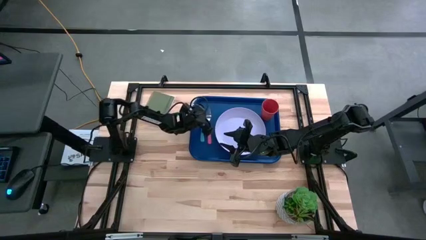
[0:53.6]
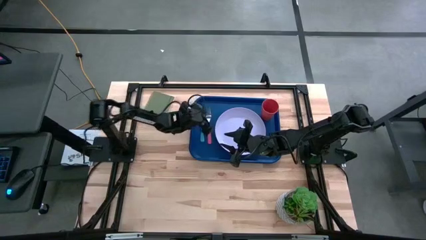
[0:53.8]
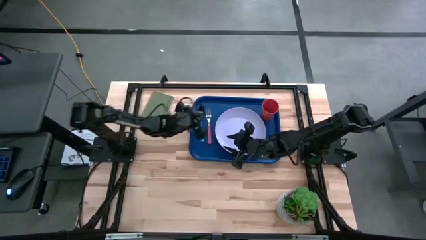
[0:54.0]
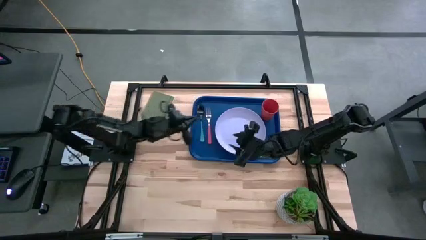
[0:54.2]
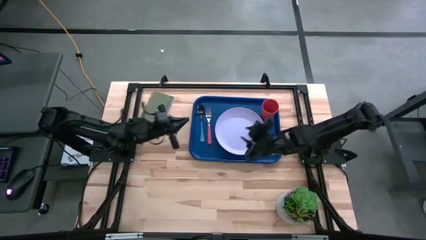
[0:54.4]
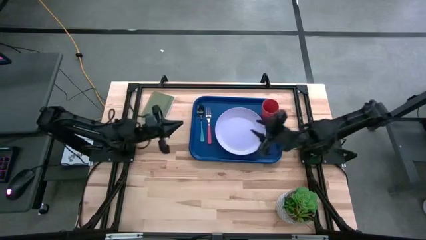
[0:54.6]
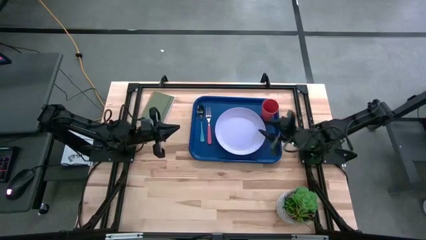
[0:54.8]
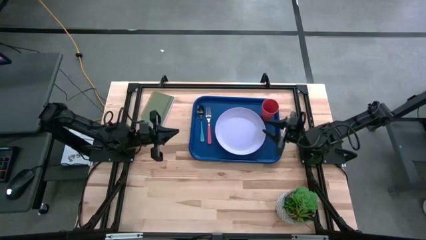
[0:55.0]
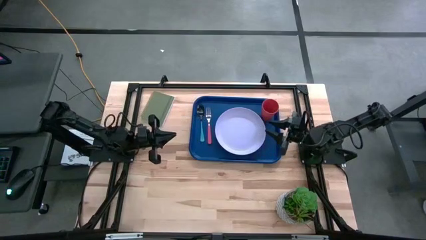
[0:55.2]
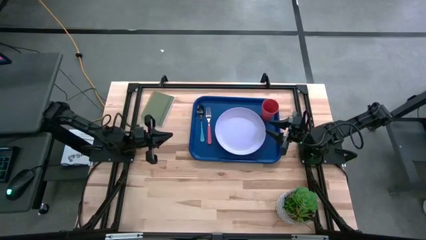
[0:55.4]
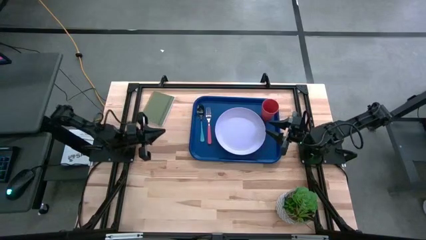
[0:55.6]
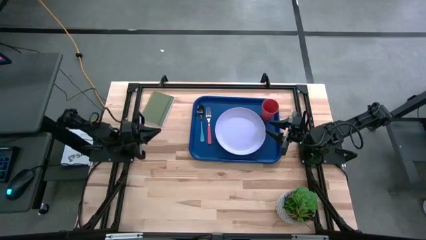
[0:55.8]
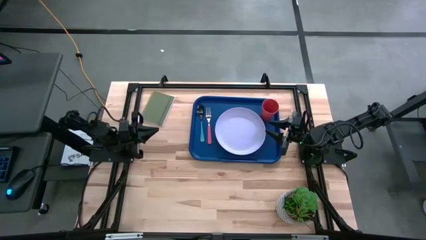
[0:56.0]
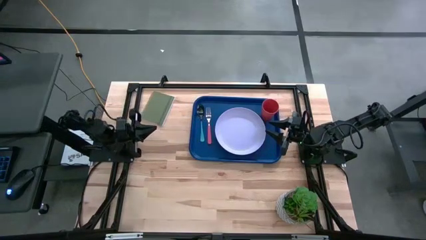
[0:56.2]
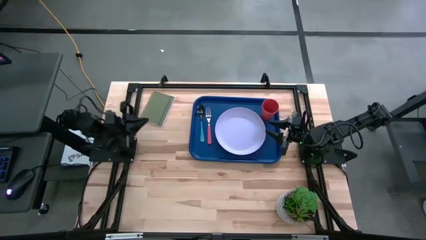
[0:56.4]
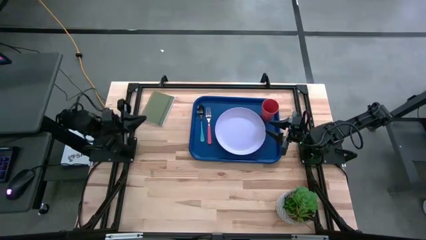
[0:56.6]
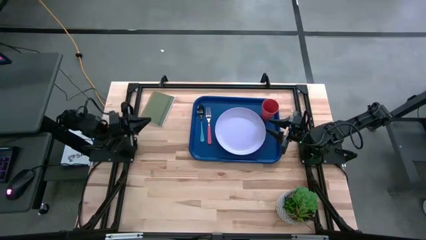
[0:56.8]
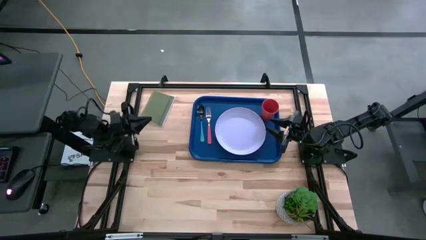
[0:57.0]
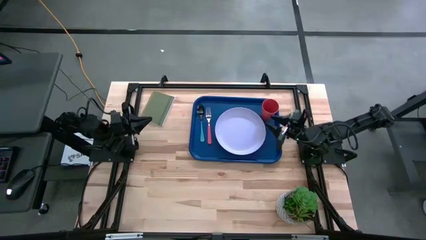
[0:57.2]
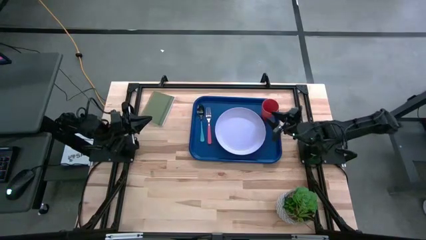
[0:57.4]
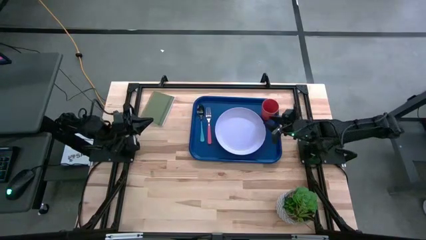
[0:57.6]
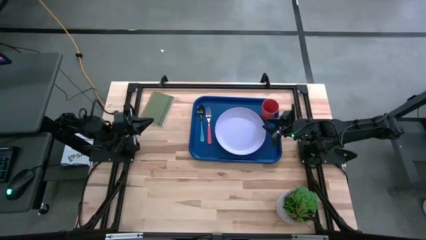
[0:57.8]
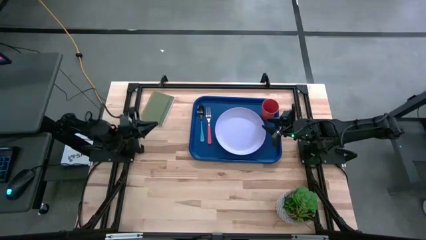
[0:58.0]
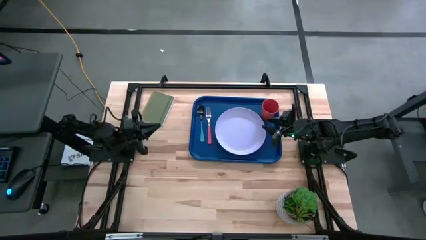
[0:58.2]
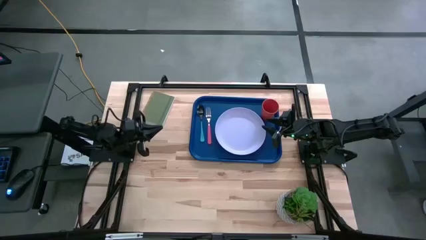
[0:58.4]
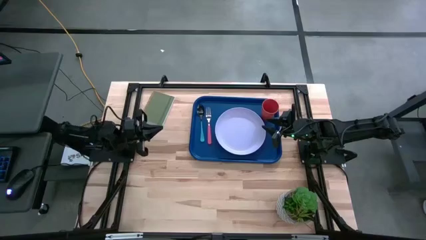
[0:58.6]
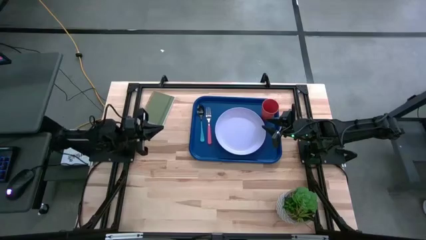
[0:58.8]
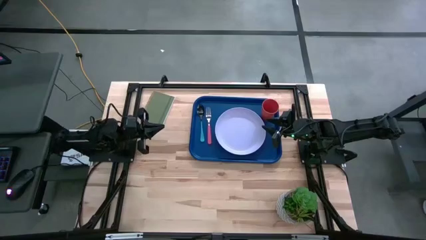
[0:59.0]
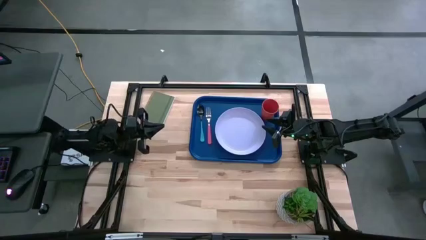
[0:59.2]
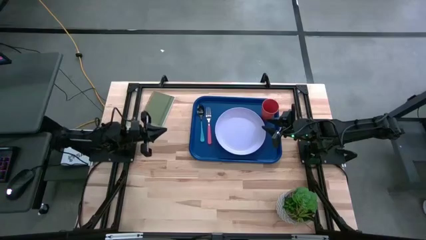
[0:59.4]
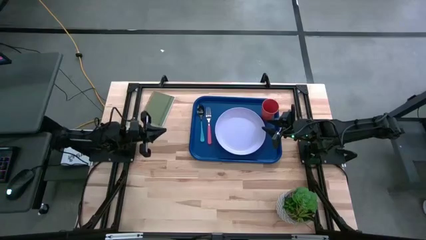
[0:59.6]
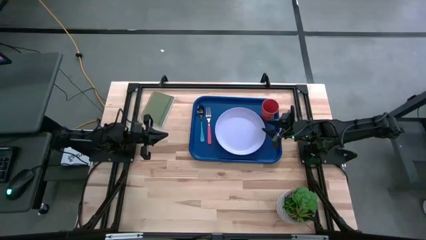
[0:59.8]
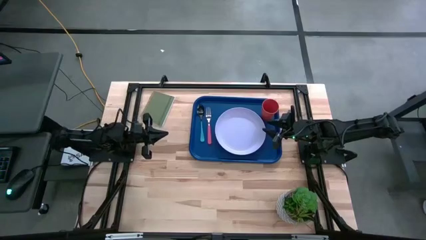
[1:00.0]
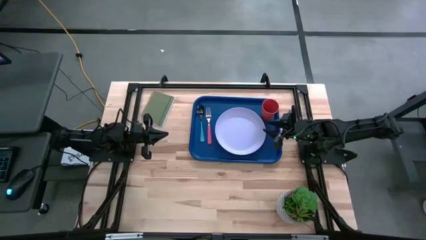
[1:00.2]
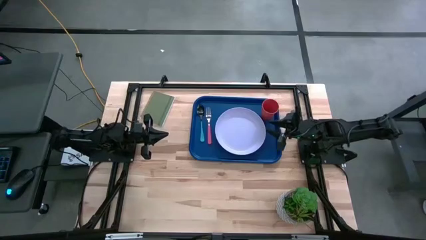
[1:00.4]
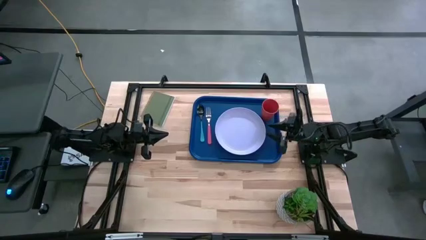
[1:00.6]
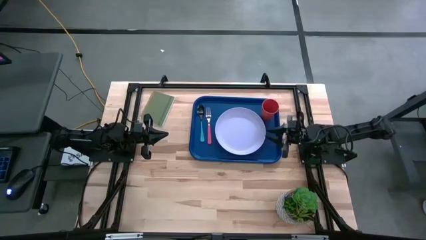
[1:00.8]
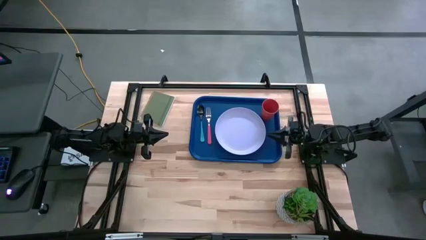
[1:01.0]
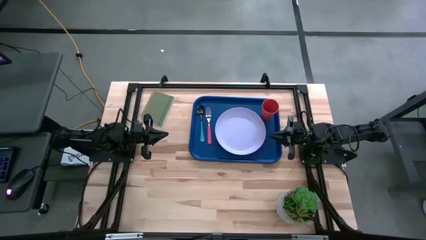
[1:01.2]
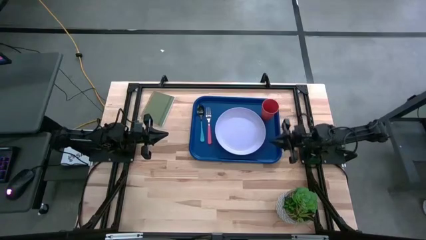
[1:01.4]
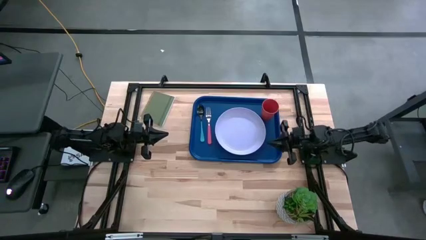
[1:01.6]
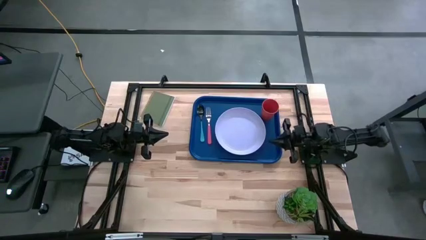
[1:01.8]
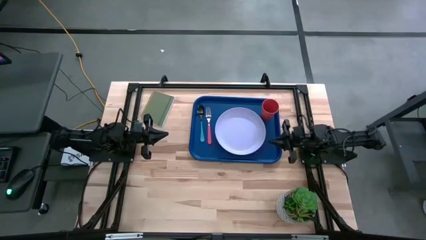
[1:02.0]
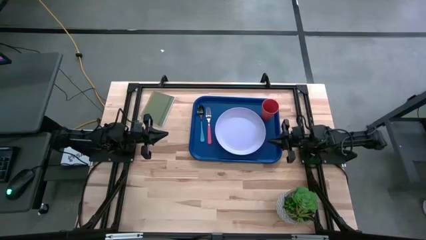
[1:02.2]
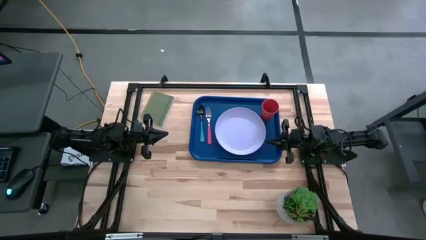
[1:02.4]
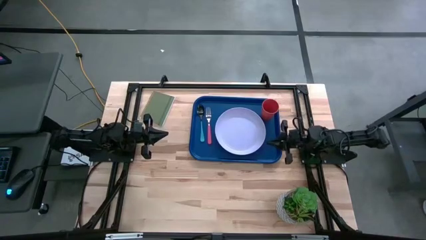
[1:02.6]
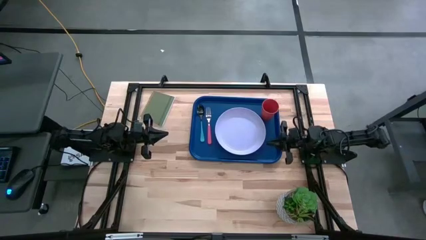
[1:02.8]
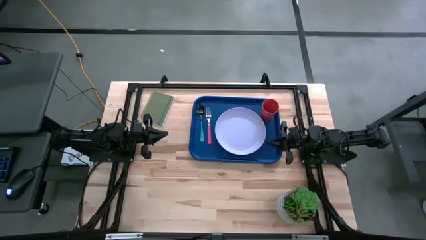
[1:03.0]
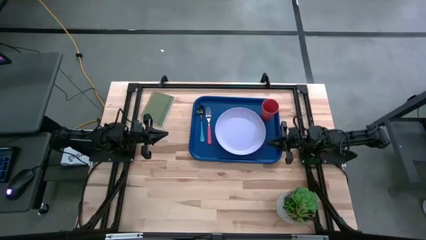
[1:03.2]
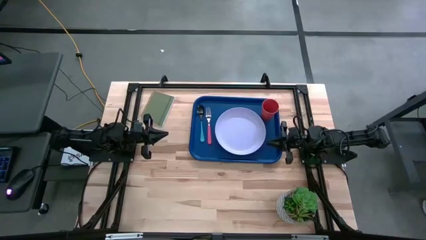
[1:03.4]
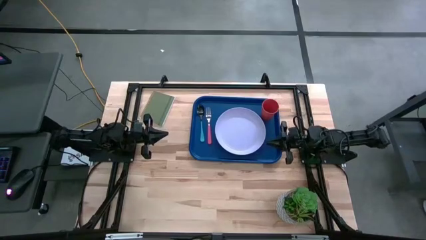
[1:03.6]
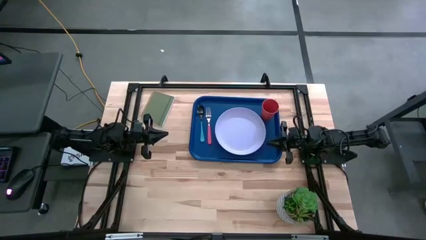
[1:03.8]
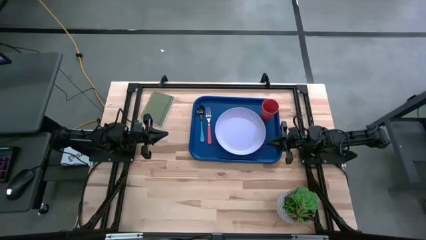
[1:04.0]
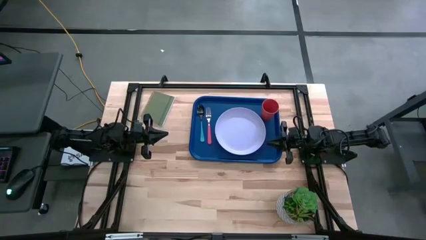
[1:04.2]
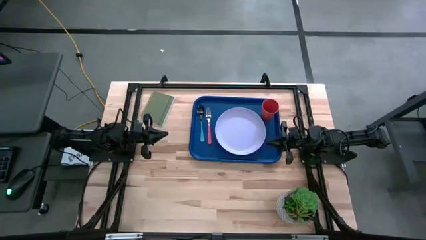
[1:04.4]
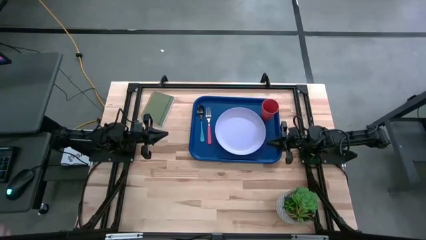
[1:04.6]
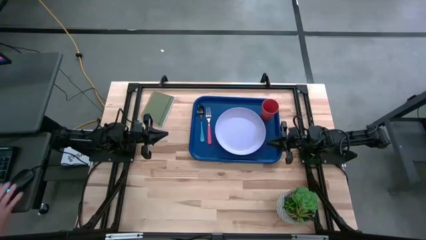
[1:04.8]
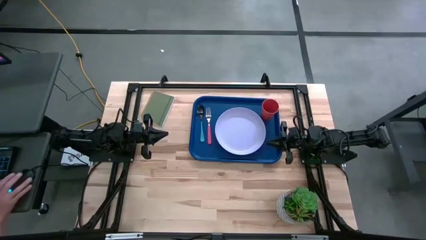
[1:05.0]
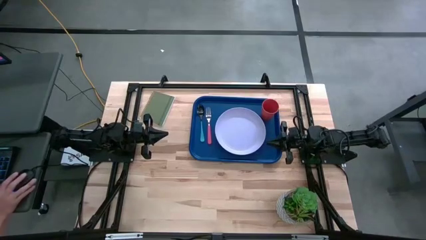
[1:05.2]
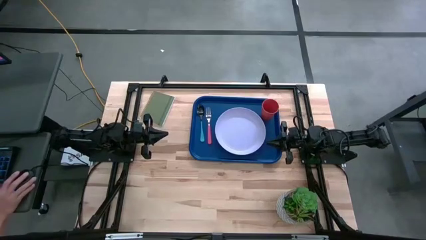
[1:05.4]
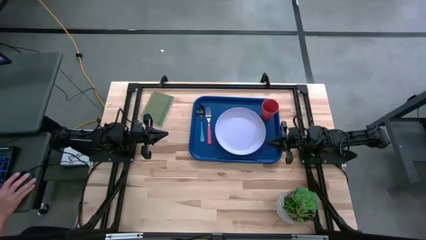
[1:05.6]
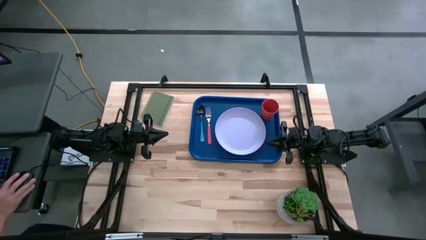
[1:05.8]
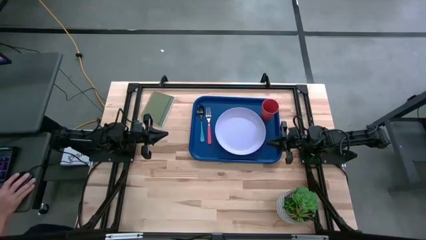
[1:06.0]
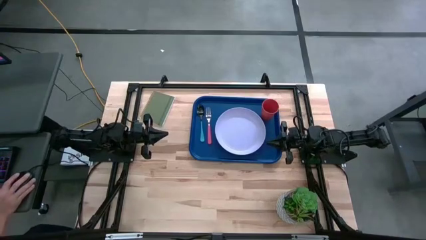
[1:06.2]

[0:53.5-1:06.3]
Task: Pick and place plate/cup/fork/spoon on tray
Return to Home Position

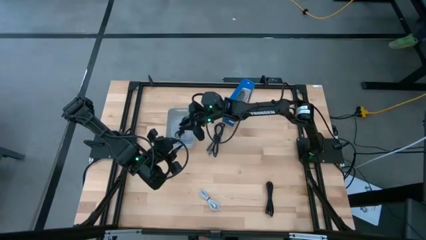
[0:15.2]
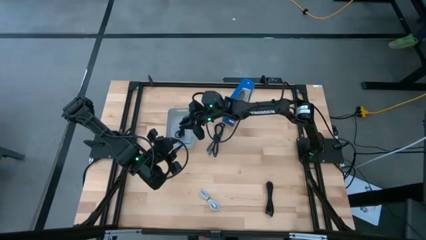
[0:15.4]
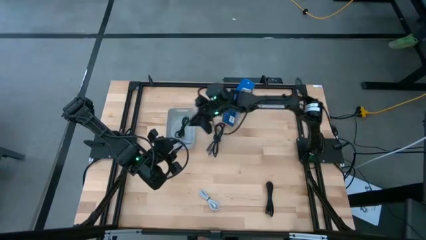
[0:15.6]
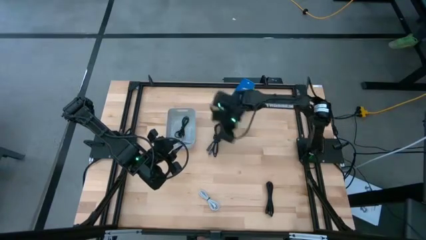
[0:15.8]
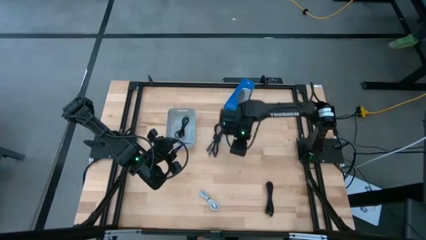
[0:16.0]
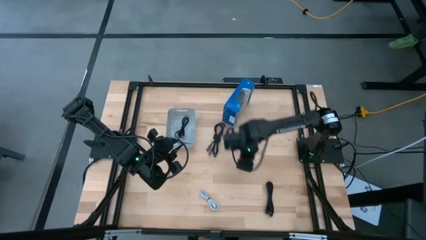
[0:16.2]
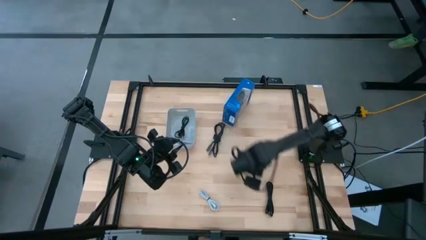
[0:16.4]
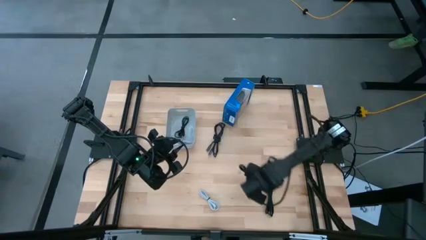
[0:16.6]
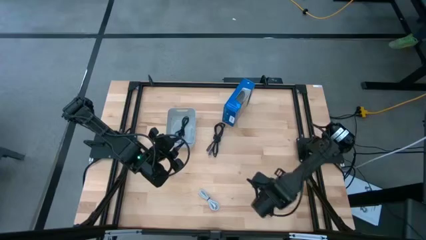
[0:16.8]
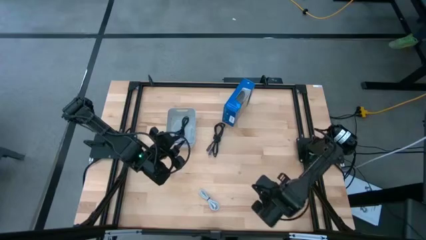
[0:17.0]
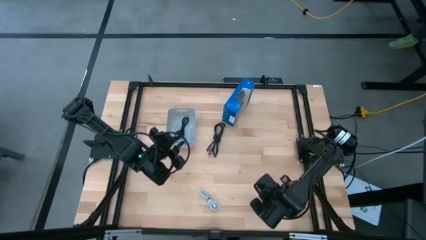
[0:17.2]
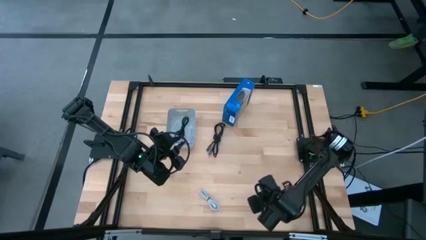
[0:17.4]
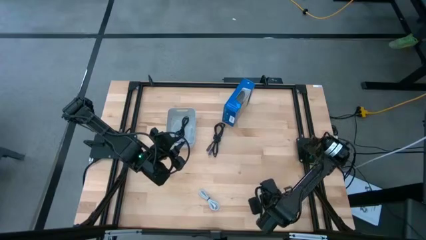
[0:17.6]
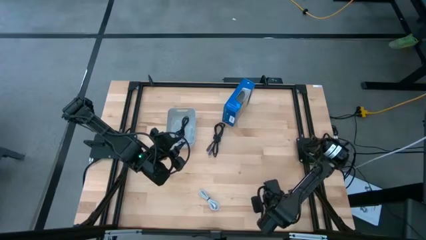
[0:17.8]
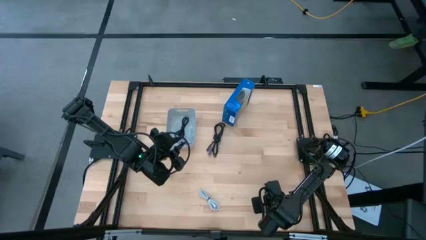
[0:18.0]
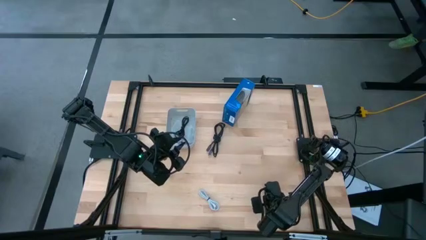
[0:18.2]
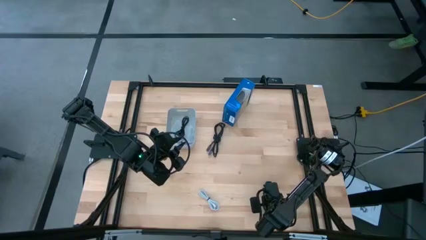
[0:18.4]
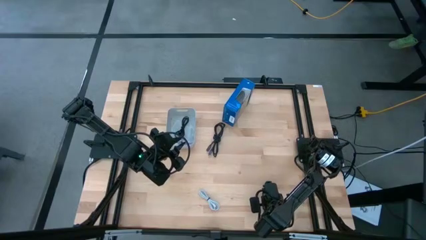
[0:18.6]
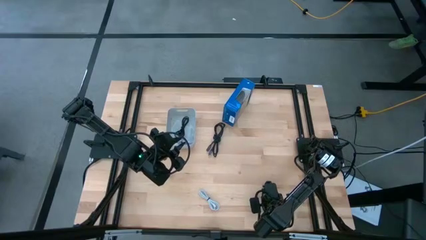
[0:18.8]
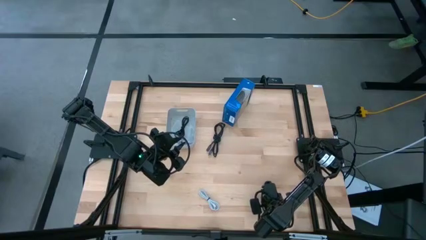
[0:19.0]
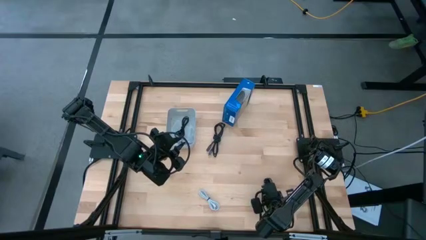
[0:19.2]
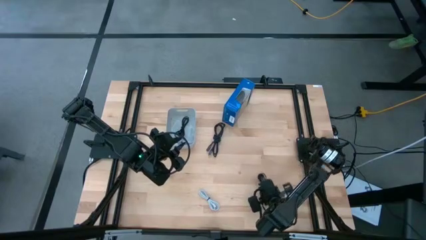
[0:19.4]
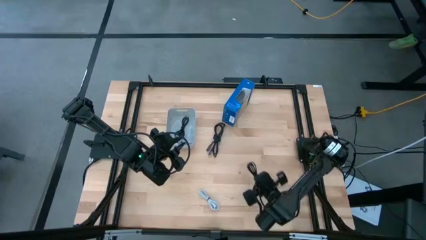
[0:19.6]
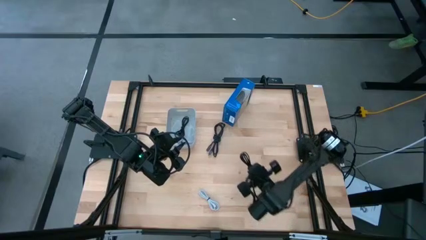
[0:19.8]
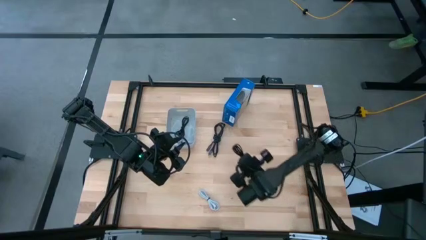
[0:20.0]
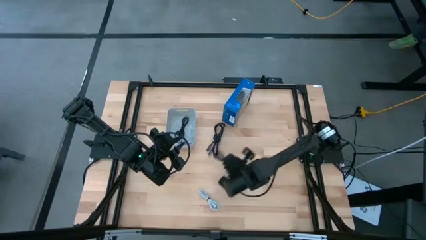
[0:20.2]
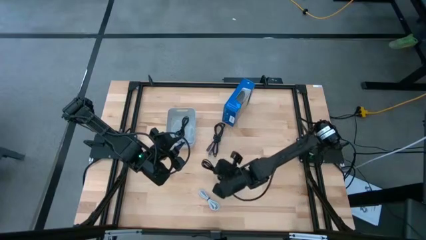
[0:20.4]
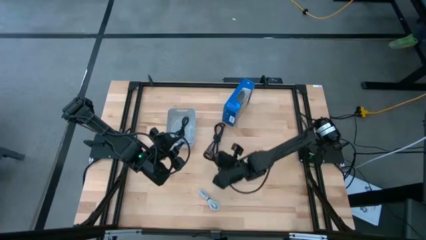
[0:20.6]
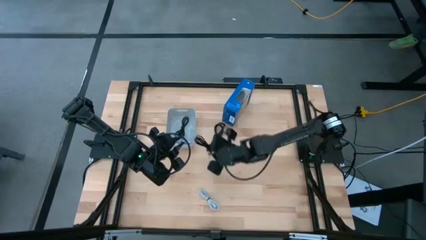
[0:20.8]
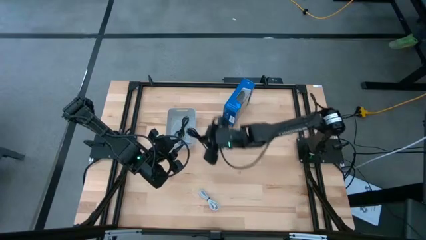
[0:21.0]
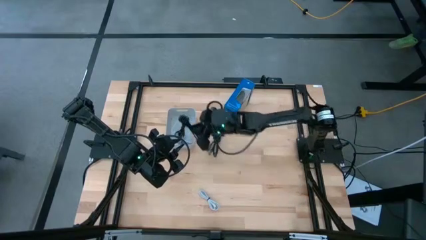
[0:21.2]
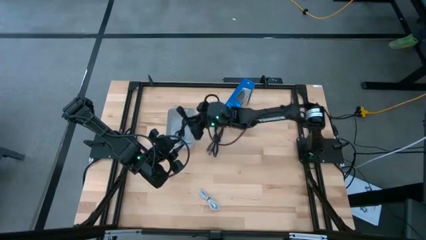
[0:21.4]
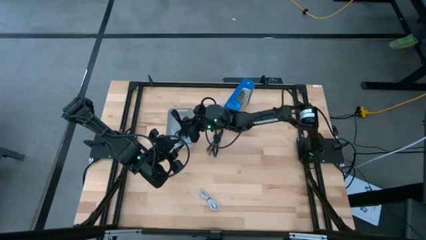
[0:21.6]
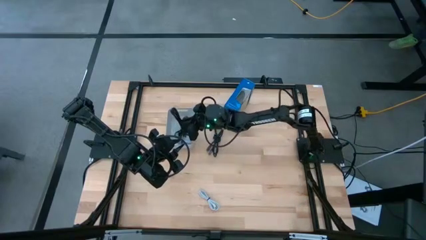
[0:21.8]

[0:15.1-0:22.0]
Task: Pick and place USB-C Cables
Put the bottom black charger cable into the white bin
